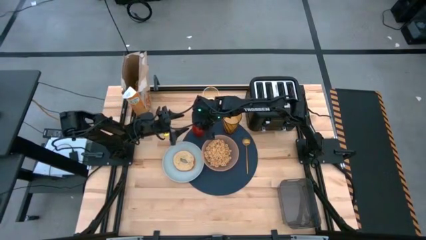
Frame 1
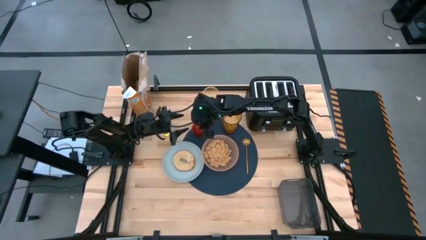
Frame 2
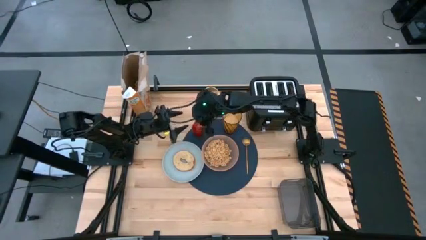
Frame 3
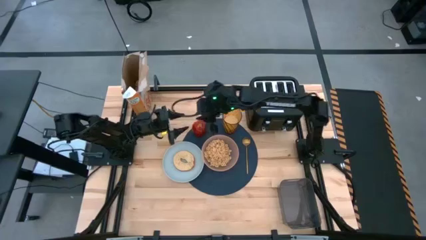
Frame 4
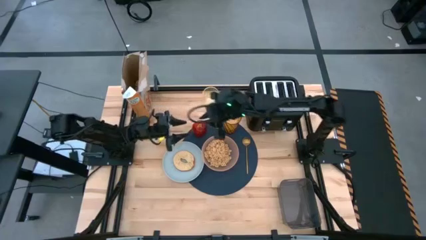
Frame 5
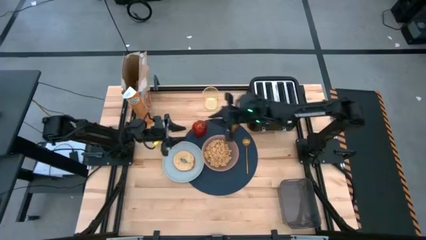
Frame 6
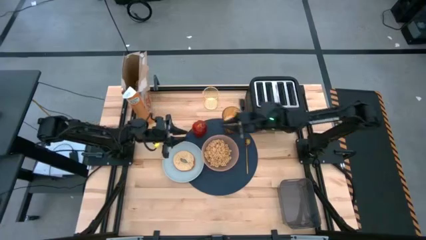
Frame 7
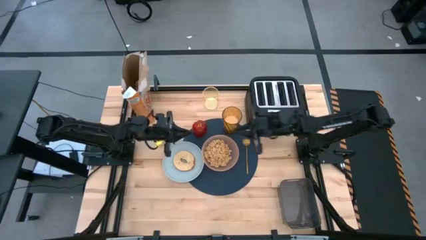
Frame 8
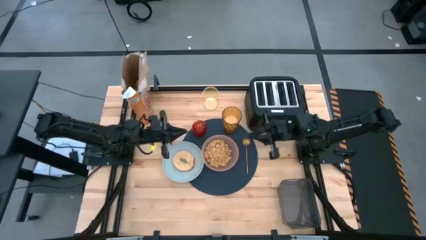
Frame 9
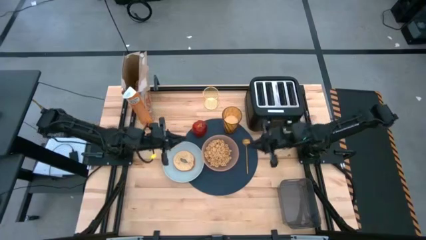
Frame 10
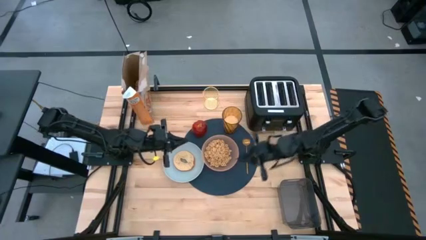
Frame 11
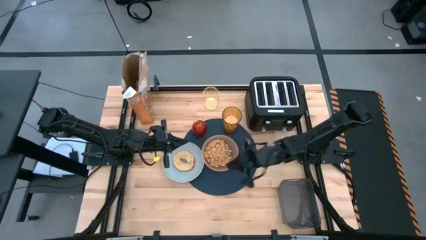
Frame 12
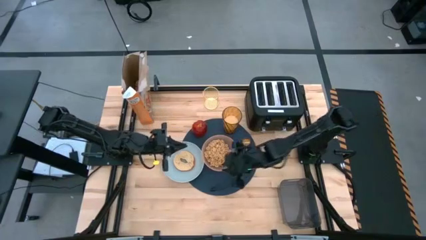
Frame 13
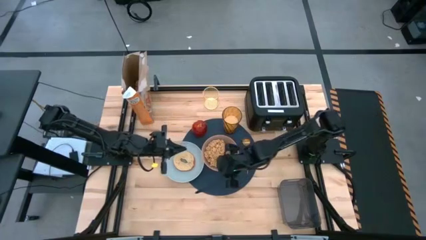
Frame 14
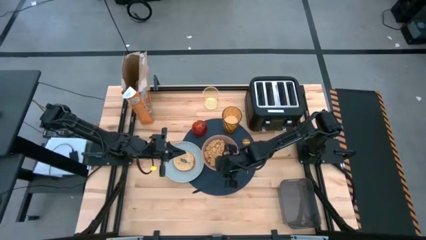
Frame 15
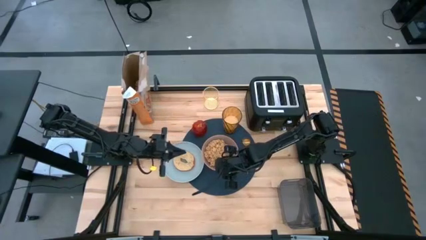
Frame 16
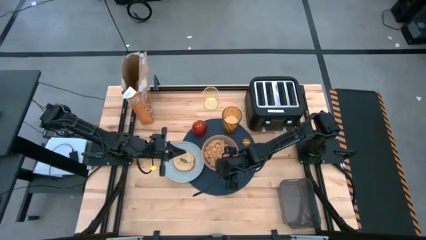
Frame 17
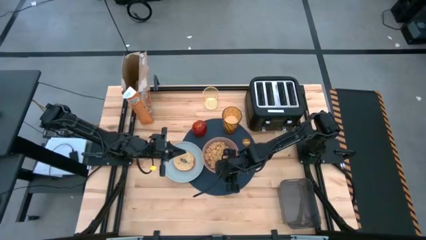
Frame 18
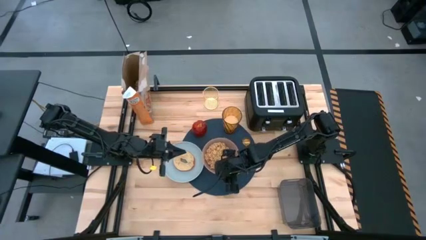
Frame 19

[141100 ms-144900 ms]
Task: Arrange a breakfast setting
Adjust the orange bowl

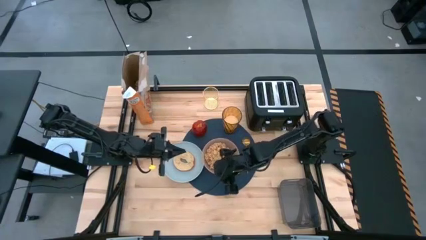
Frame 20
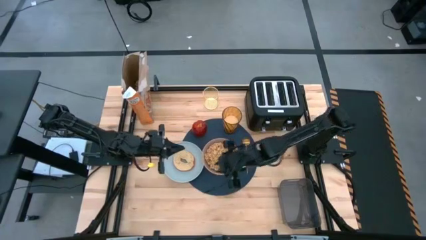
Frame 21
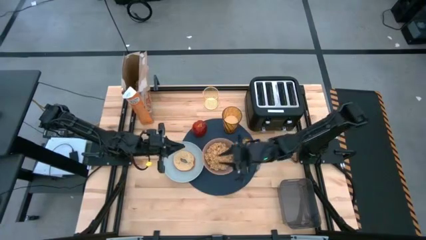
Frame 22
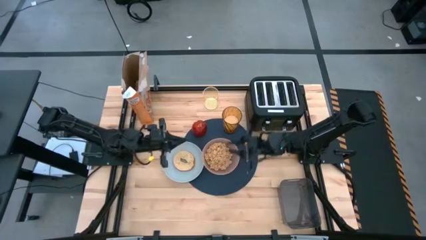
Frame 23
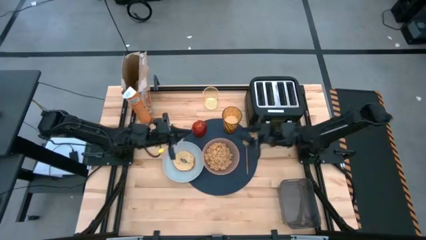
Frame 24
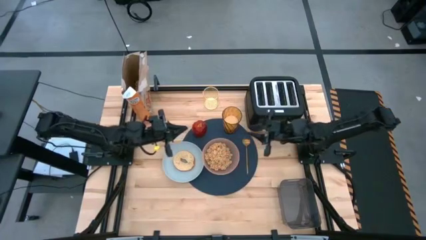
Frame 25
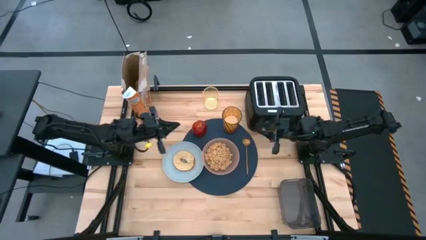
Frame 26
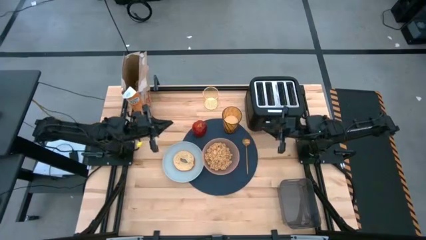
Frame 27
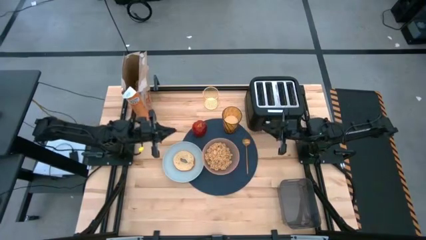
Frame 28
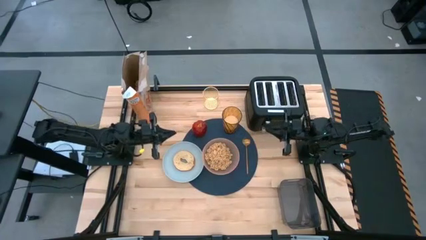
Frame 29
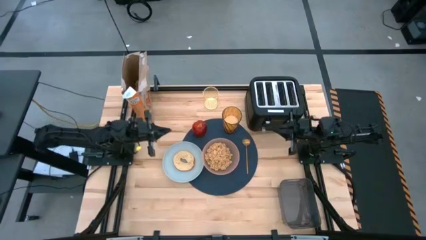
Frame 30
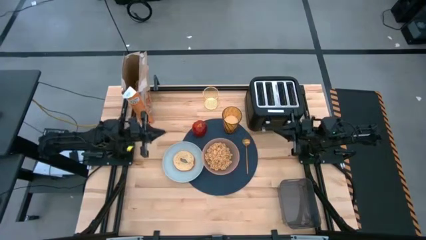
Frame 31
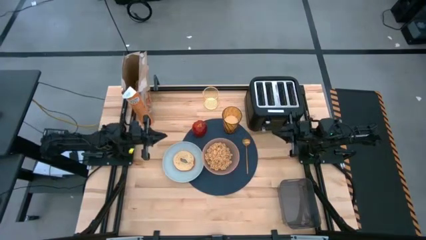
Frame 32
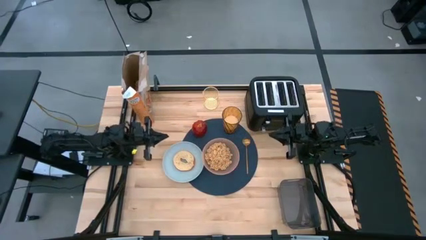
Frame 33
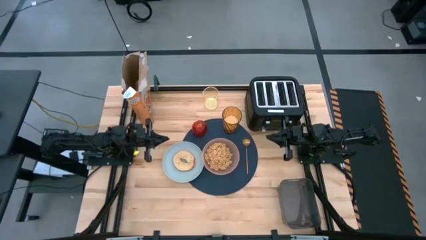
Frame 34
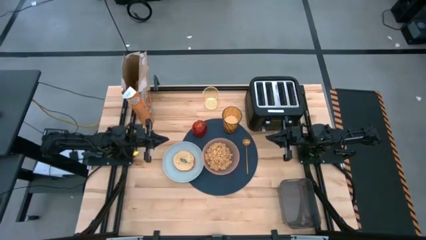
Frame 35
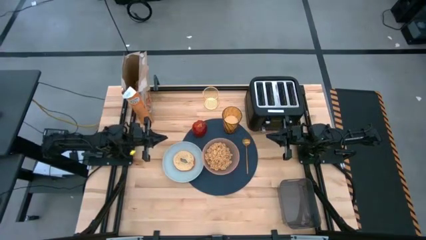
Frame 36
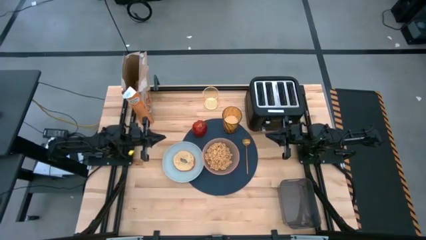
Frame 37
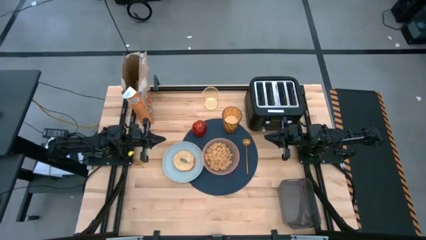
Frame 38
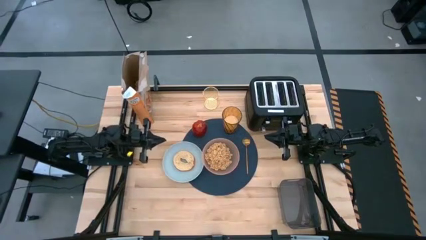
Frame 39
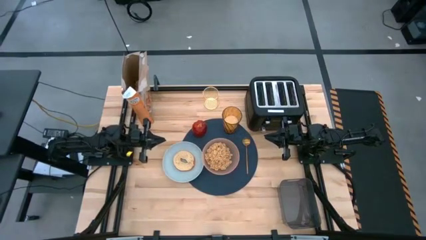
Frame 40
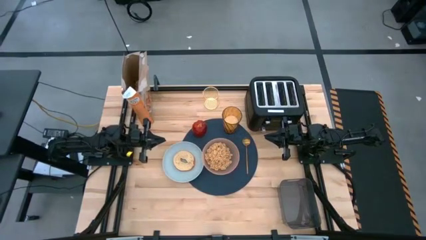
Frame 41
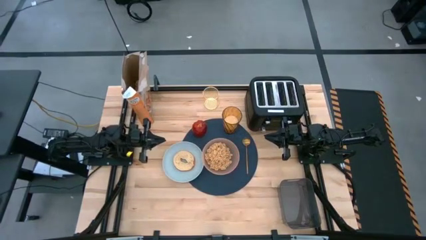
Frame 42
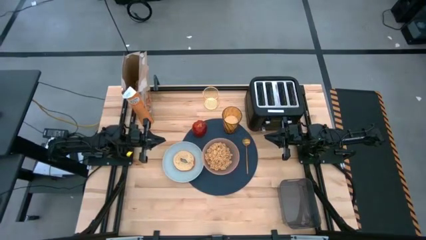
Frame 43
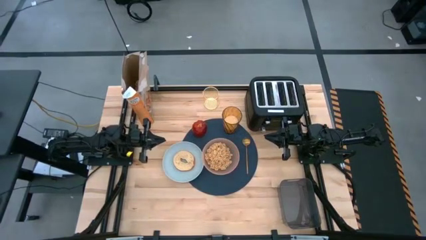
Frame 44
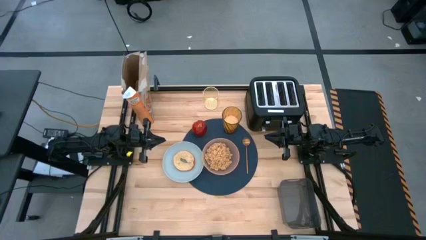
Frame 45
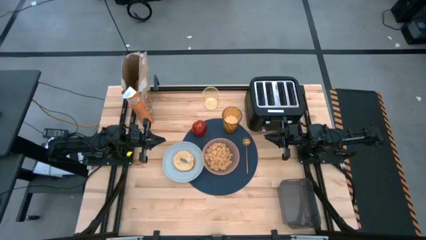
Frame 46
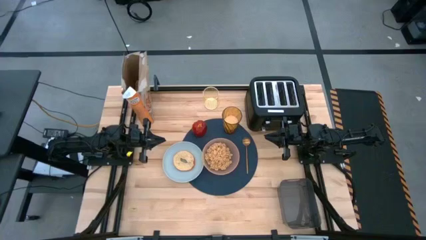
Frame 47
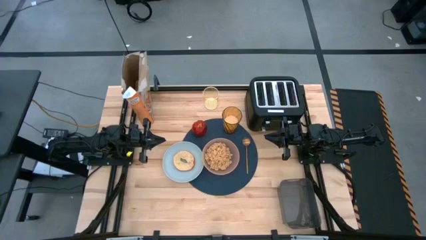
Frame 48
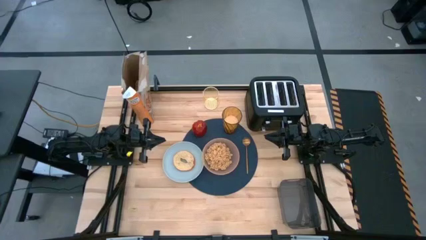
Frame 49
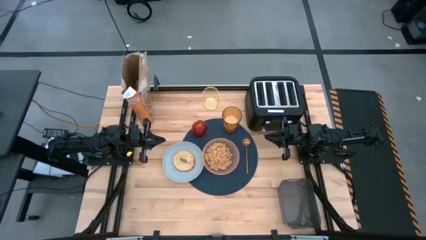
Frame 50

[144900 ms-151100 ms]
Return to Home Position

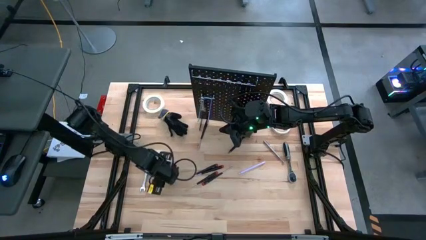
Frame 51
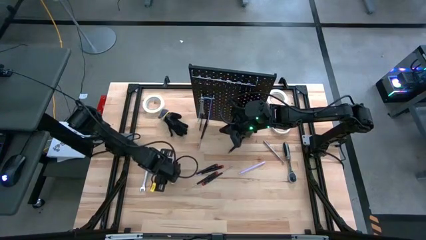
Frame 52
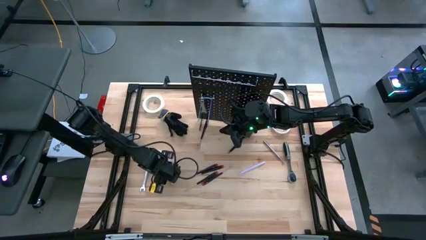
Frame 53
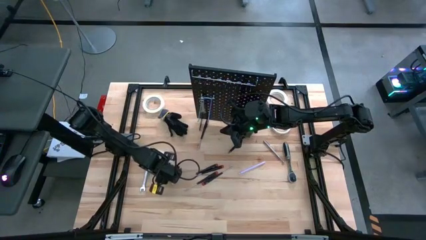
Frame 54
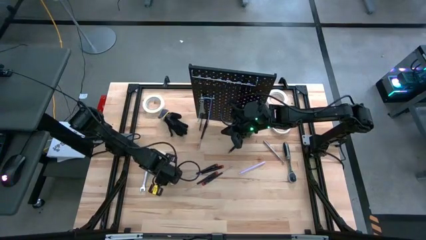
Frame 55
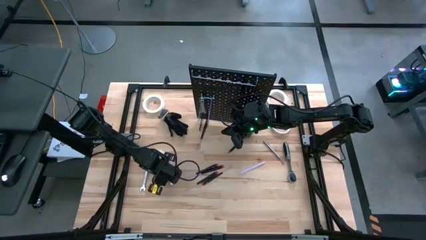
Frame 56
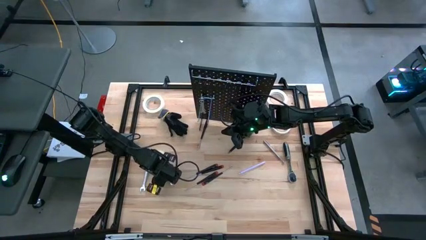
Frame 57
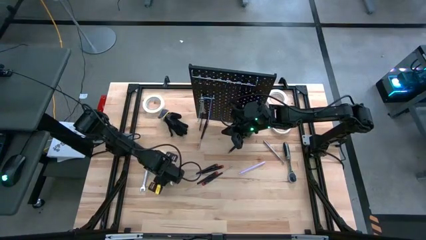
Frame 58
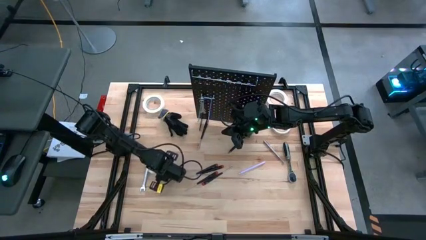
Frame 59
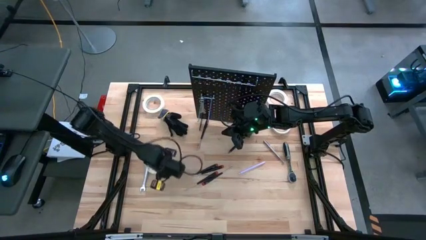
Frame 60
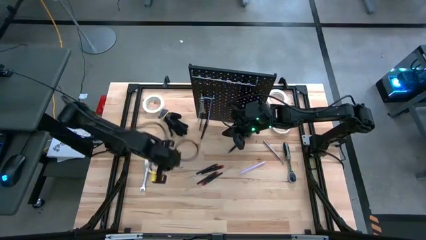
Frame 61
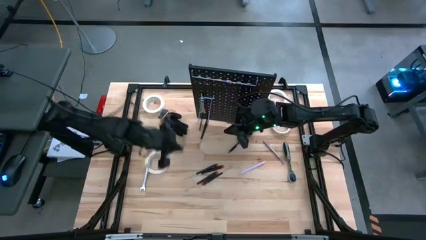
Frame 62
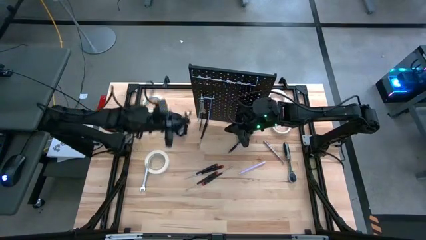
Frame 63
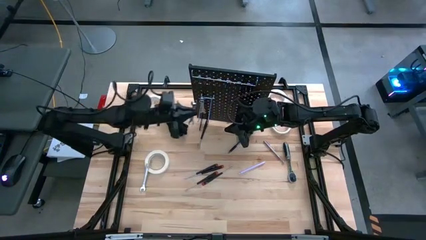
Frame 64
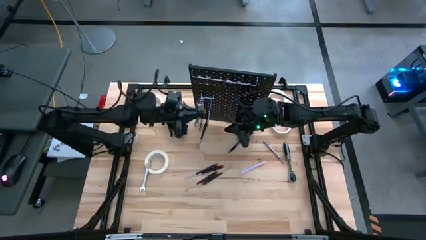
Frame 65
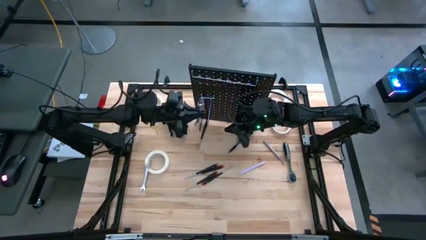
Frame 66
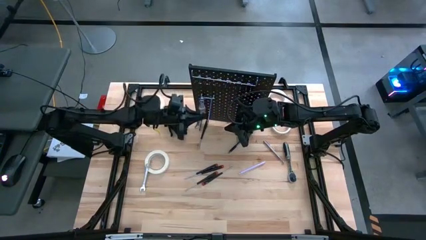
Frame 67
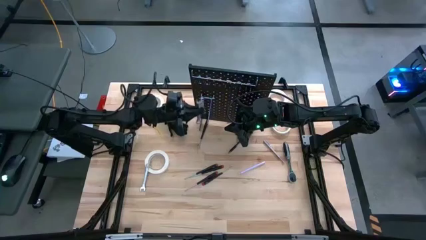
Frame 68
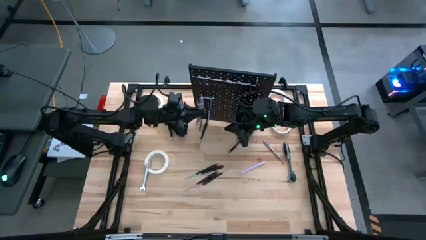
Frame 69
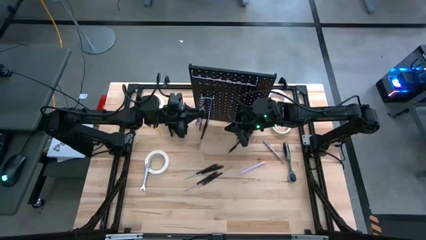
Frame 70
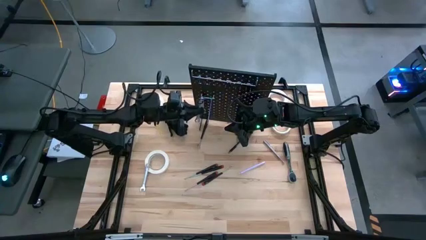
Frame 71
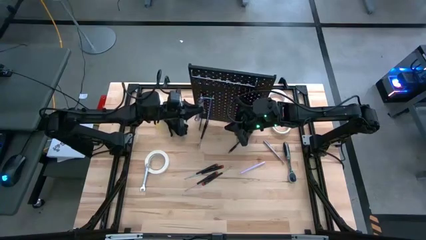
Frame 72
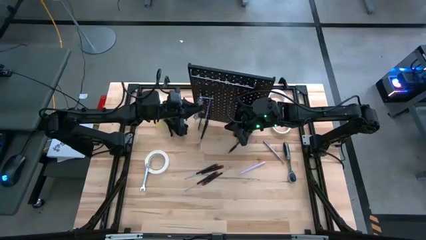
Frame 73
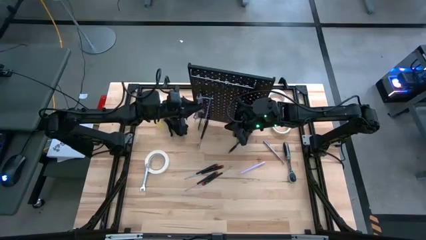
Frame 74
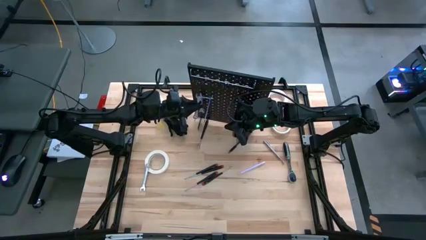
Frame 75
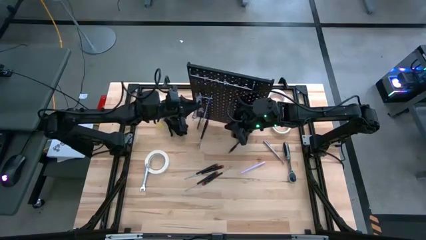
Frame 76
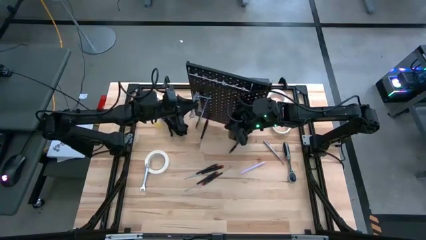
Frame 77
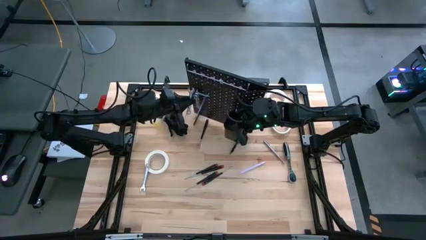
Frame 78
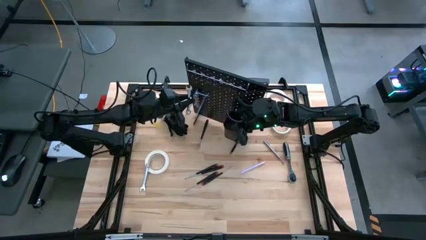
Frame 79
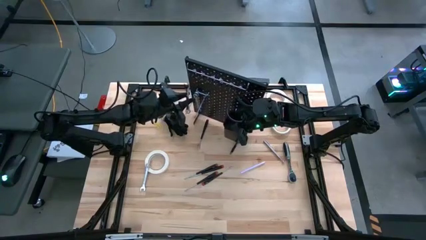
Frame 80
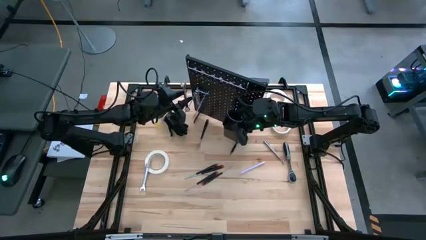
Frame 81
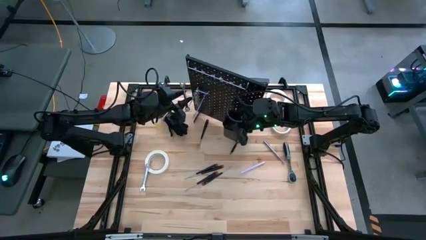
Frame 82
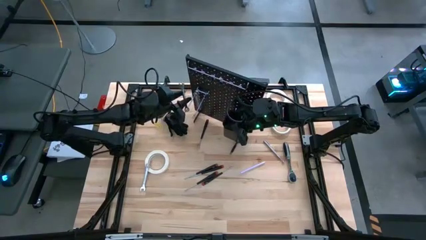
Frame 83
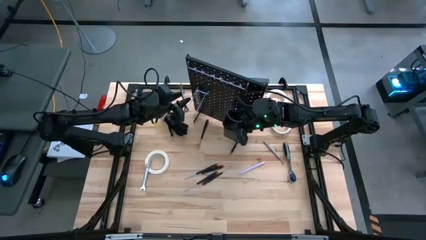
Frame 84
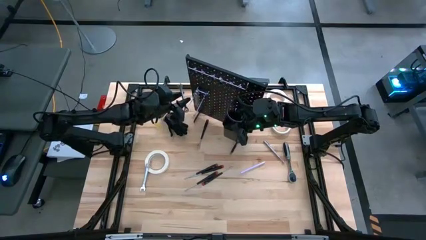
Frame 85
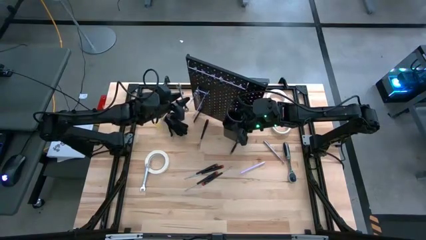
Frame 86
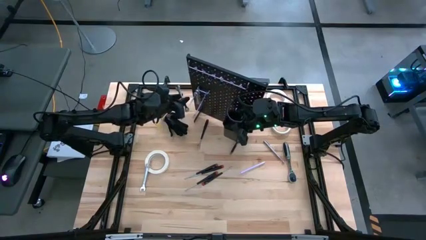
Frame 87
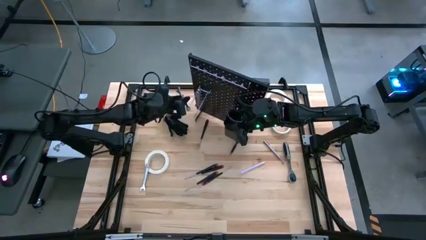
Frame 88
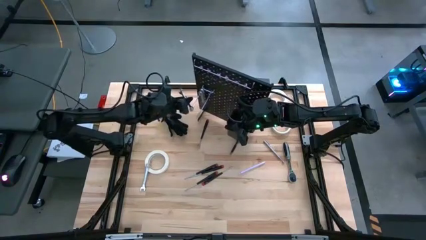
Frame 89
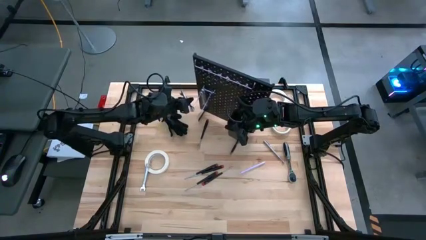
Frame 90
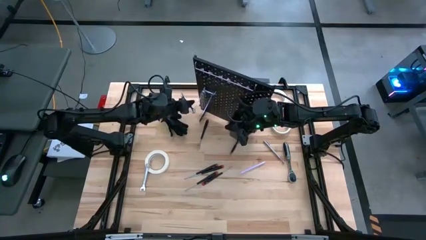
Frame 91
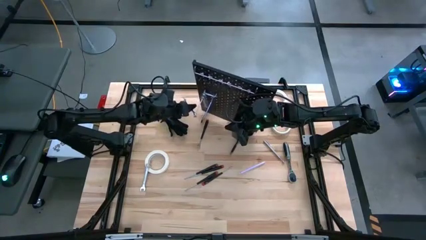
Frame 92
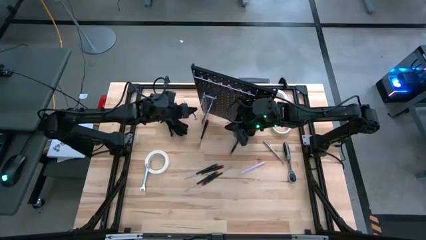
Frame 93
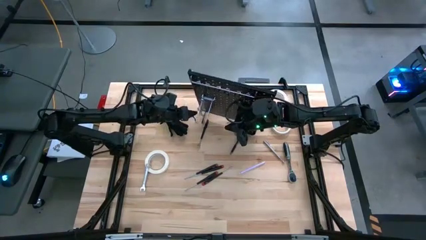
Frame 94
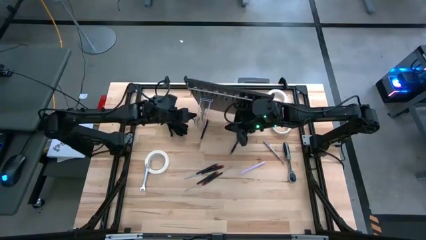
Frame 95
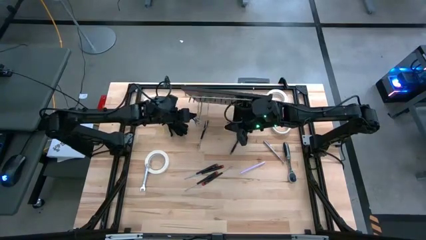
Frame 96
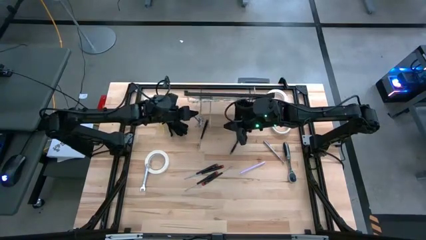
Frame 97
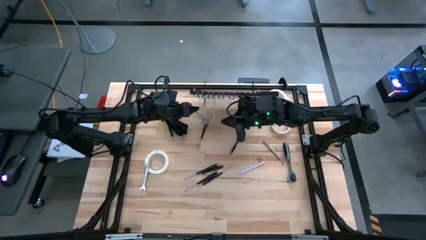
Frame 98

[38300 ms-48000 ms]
Task: Hang tools onto peg board
Hang the silver wrench on the peg board
